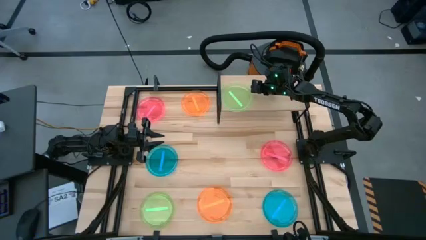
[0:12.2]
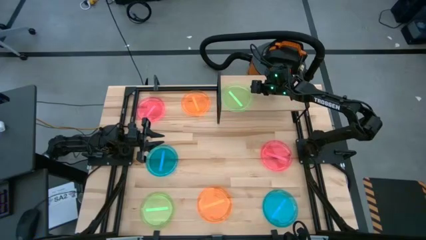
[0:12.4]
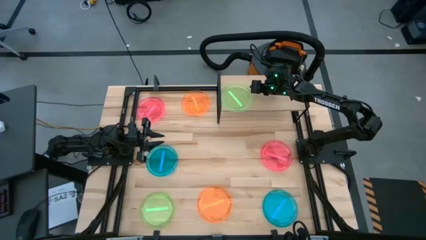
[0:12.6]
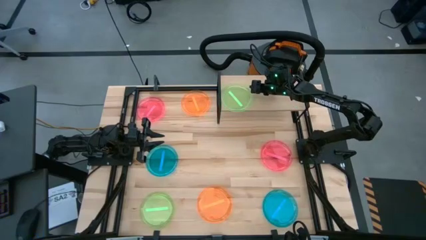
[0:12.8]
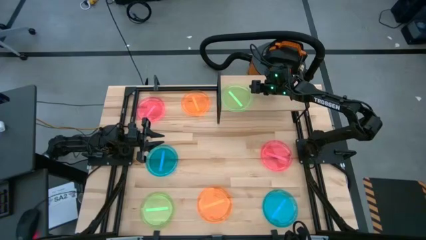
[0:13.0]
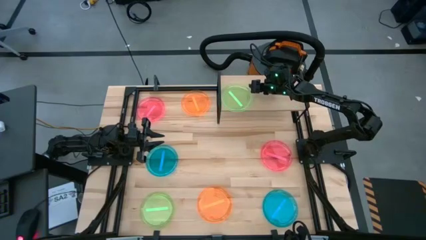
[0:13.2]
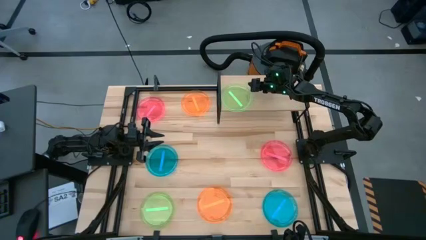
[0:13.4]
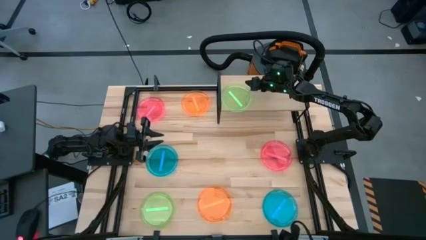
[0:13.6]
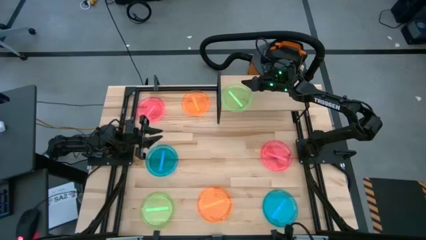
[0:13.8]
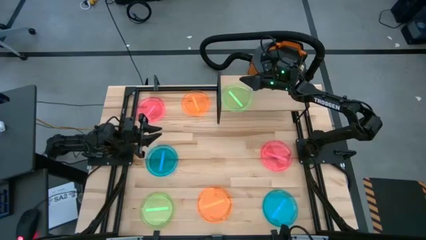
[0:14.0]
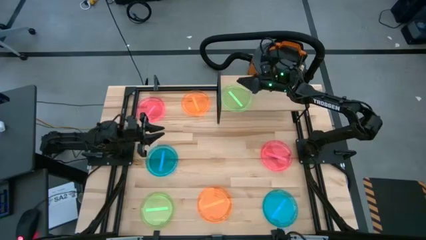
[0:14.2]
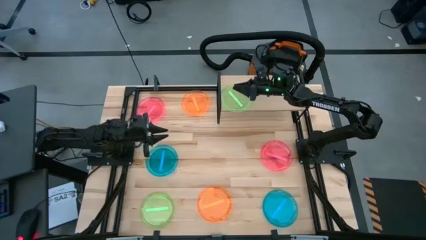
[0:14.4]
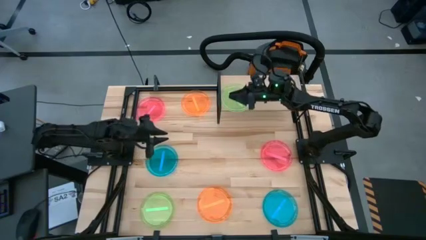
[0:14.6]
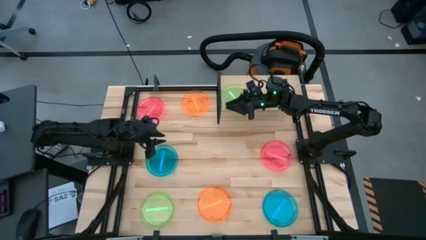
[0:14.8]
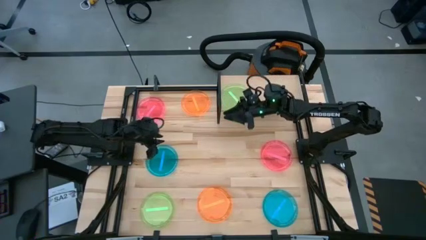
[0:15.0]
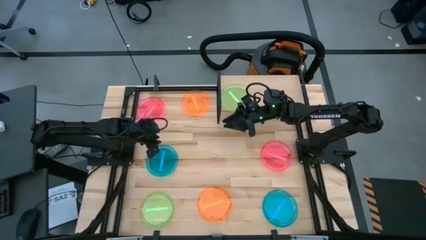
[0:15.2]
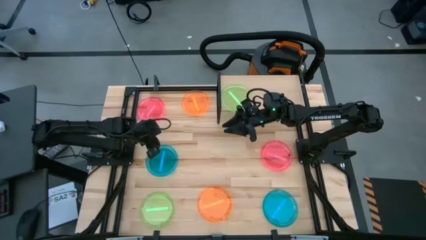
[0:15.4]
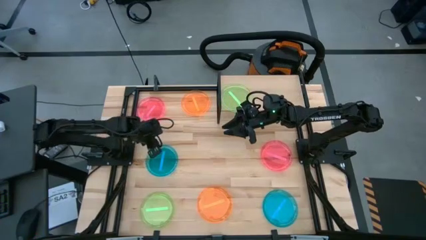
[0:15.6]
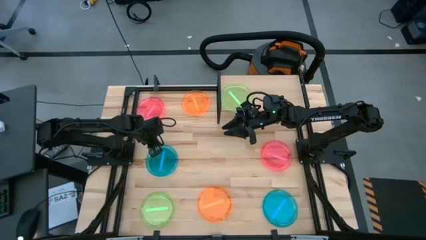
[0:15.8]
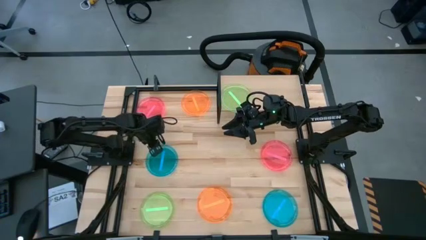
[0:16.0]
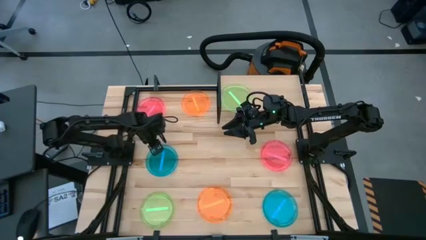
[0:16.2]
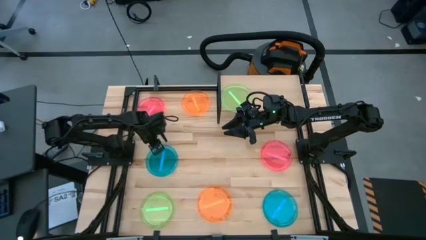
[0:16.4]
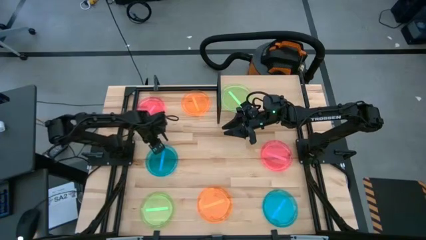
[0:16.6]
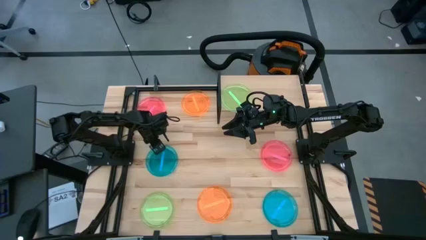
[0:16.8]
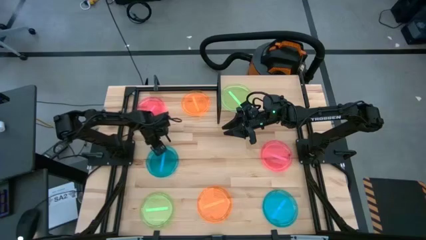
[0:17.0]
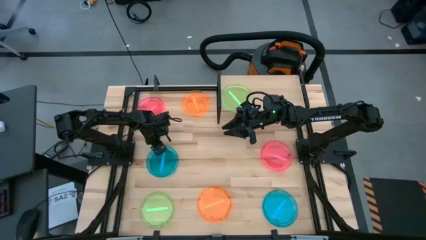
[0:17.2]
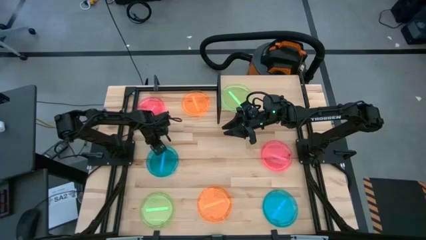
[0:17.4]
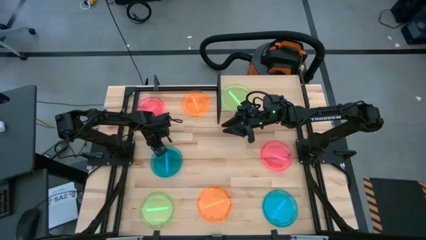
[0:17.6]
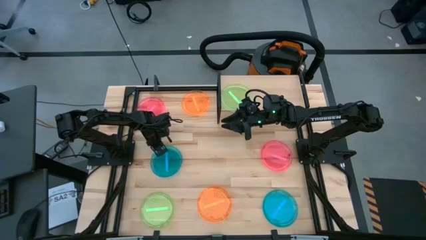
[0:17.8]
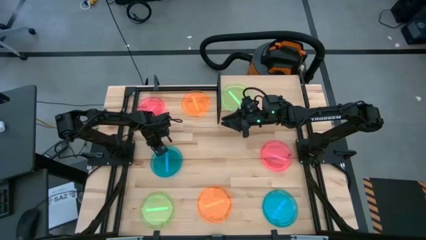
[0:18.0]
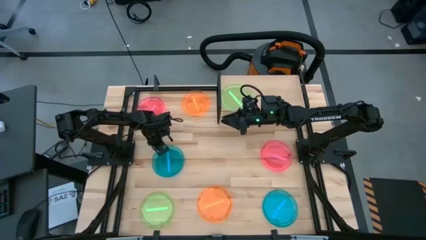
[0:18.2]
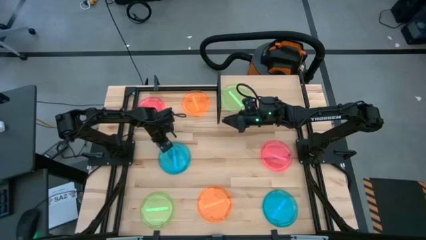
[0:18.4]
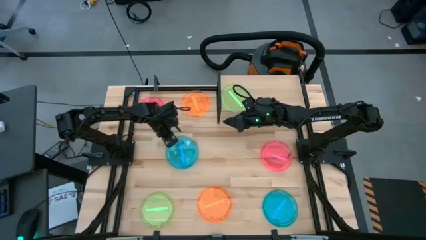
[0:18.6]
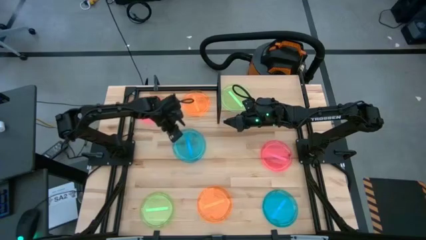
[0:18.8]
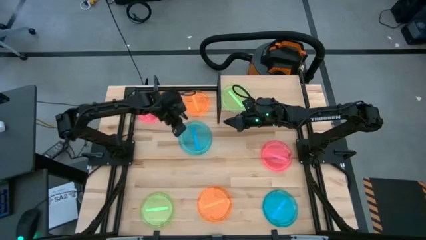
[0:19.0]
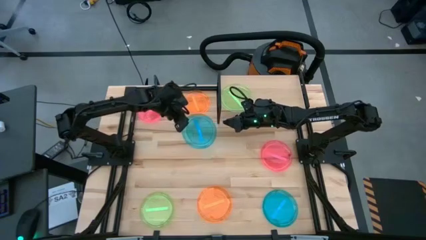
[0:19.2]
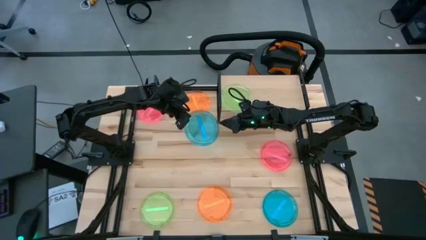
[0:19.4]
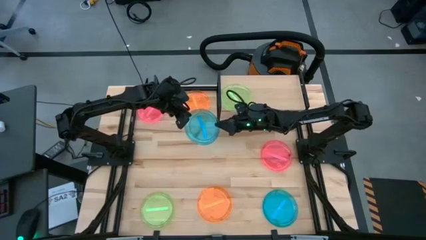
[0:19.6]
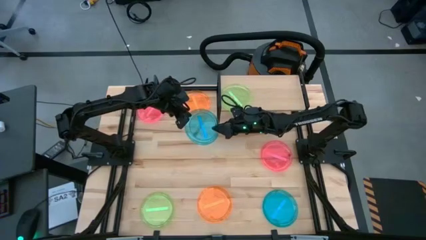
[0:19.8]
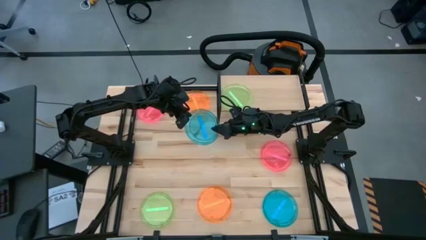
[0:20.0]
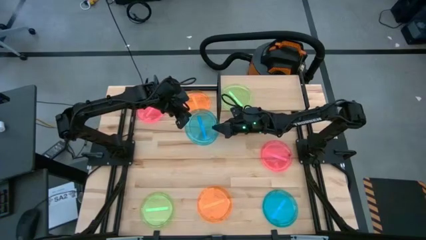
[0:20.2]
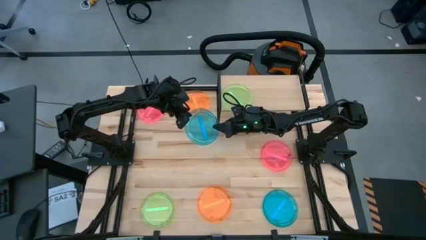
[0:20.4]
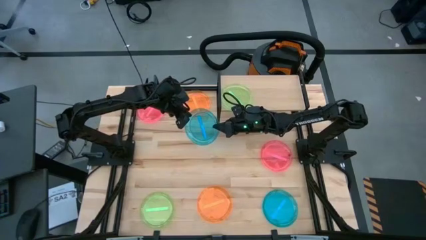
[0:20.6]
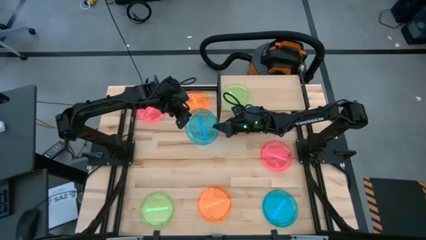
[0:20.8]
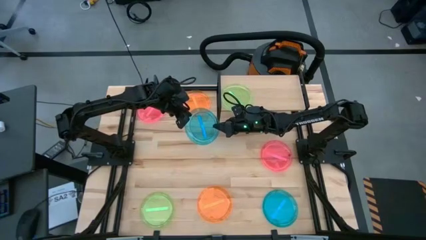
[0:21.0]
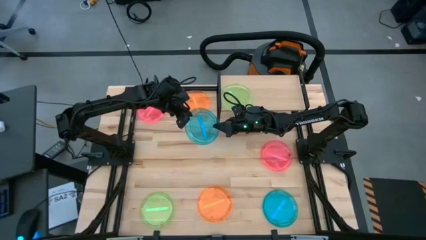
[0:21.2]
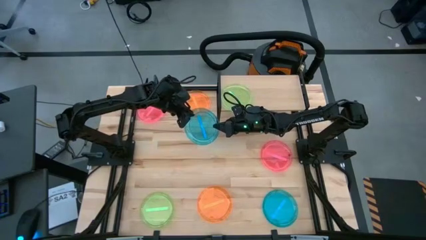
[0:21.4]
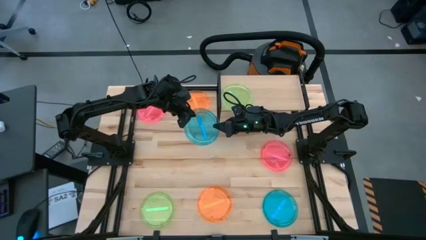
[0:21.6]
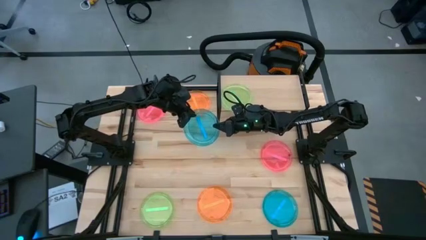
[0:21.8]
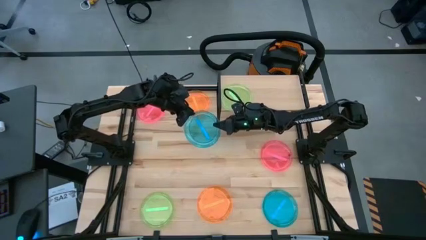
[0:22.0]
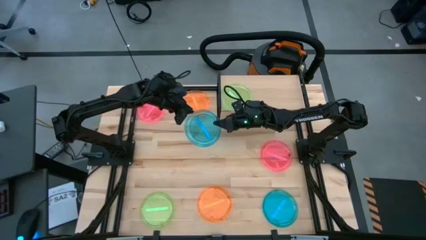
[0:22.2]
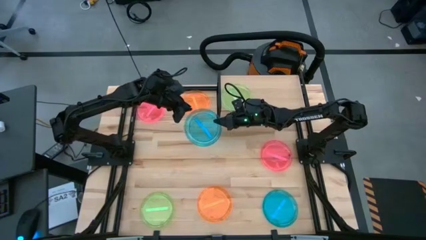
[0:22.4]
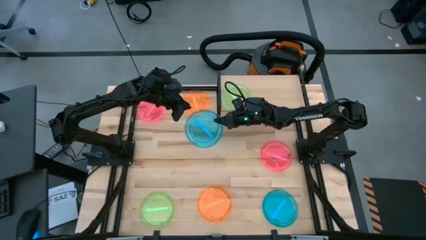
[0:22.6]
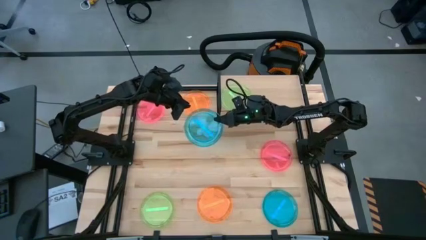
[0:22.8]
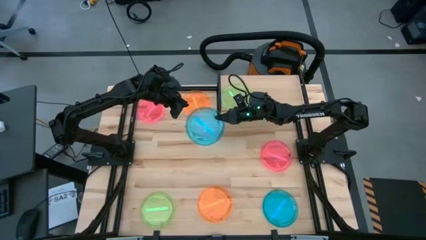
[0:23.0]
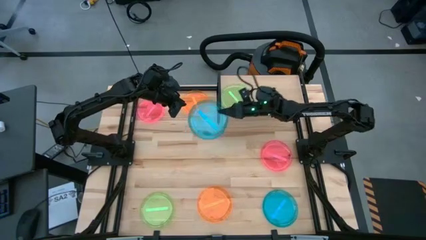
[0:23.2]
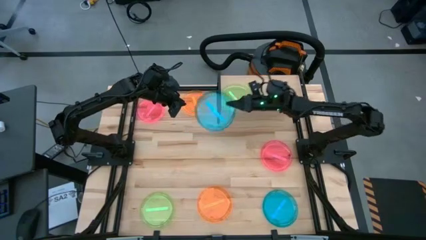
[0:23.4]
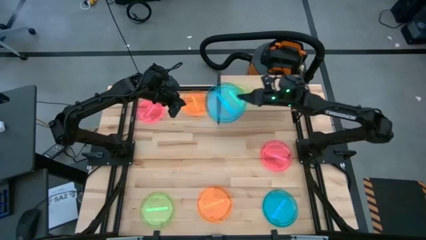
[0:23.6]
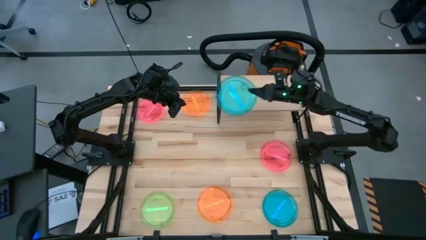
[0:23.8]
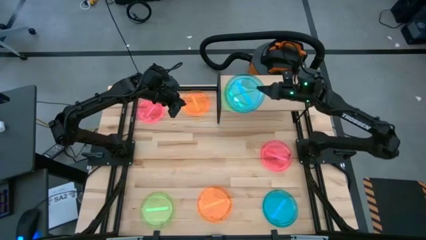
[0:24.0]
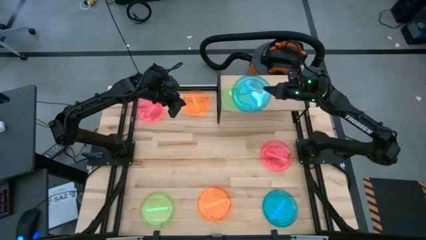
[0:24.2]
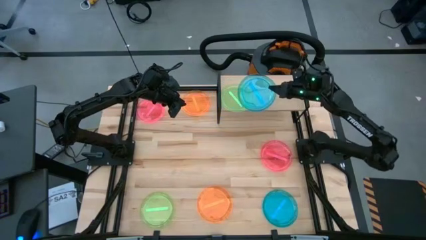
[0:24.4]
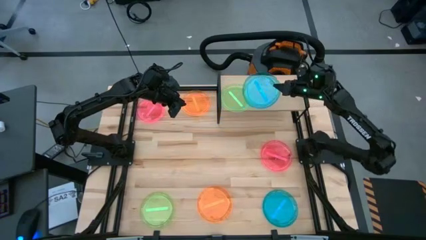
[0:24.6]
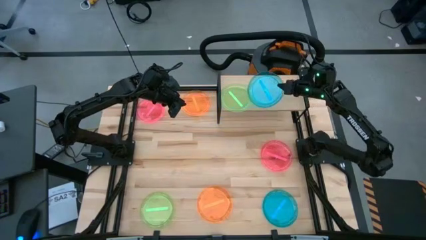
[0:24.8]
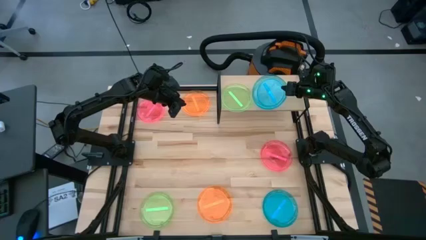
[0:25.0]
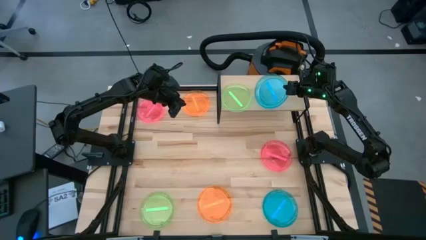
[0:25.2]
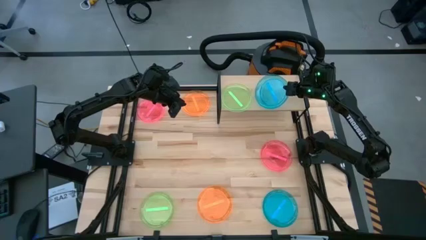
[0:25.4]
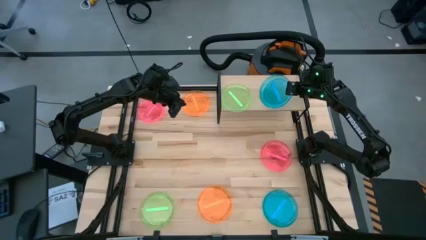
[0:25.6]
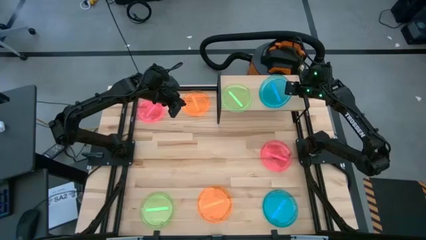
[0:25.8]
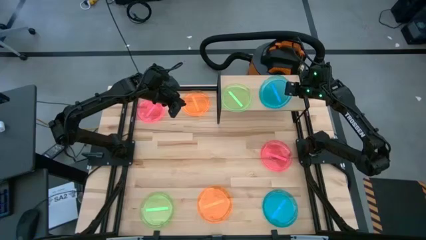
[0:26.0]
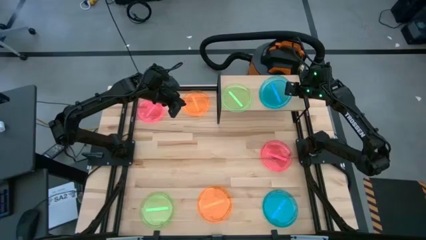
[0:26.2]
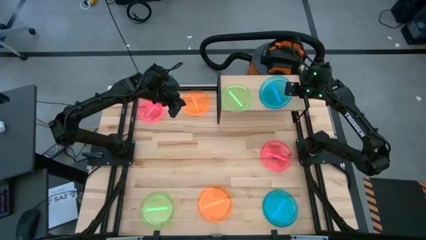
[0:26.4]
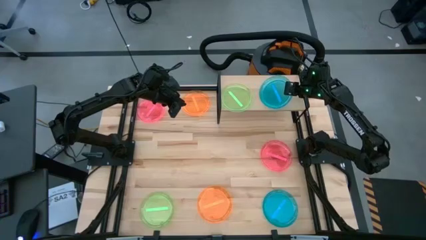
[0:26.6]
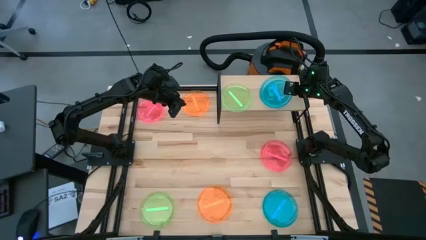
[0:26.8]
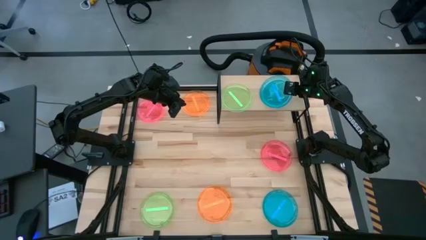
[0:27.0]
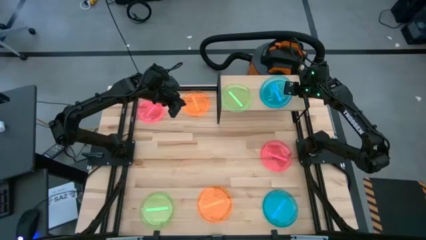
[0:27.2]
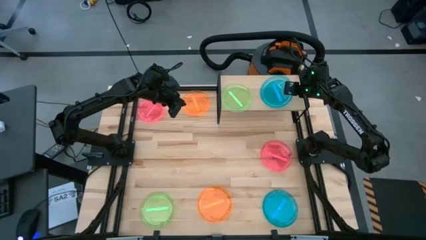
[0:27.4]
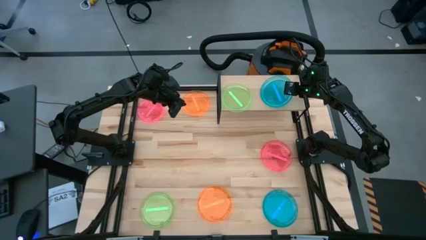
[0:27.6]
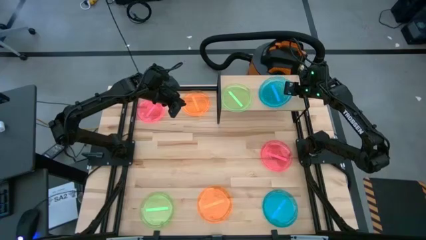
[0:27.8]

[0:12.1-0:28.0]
Task: Place and stack plates onto a shelf
Put the left blue plate on the shelf
